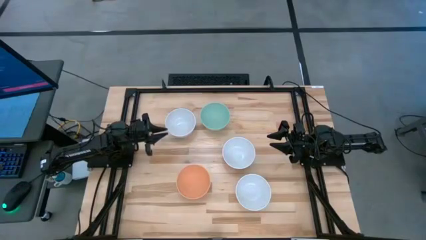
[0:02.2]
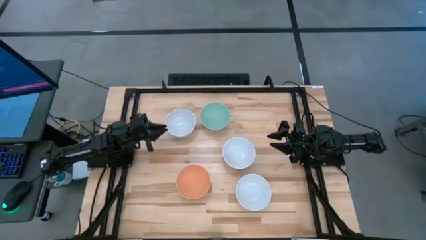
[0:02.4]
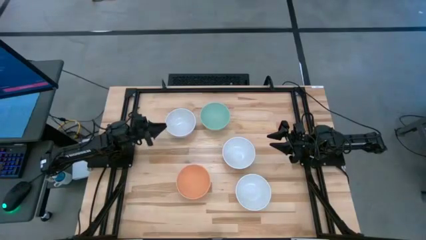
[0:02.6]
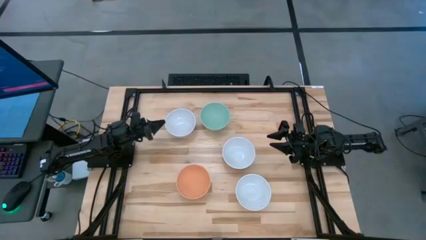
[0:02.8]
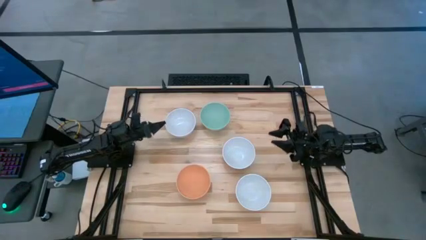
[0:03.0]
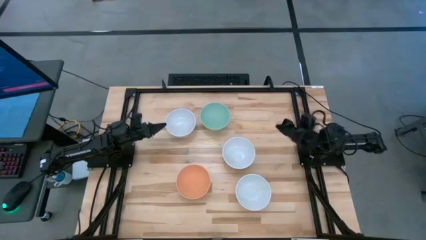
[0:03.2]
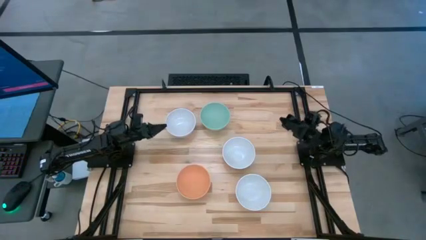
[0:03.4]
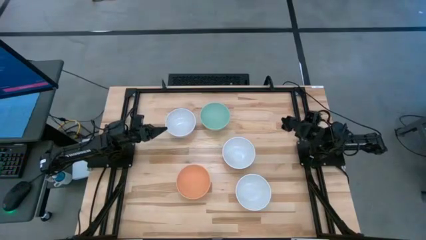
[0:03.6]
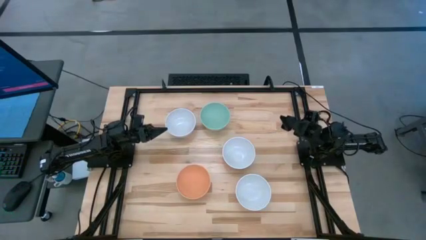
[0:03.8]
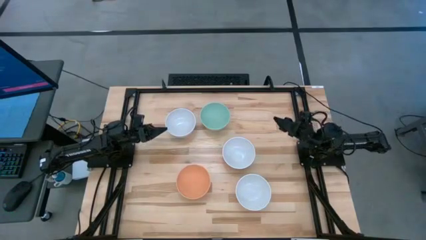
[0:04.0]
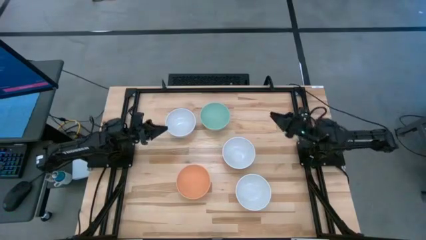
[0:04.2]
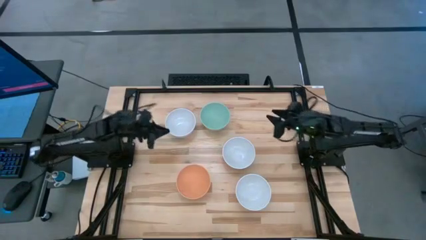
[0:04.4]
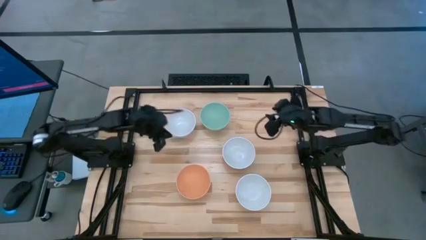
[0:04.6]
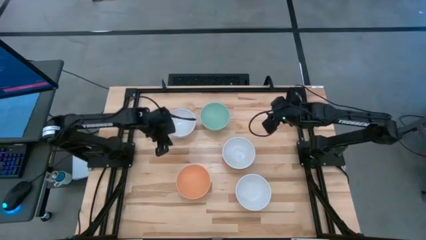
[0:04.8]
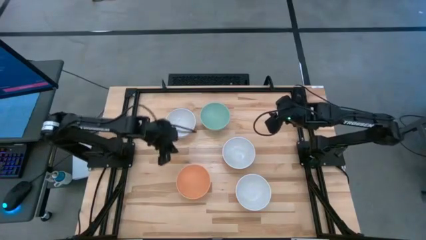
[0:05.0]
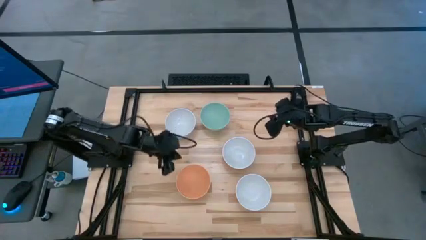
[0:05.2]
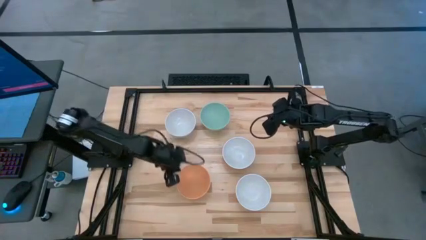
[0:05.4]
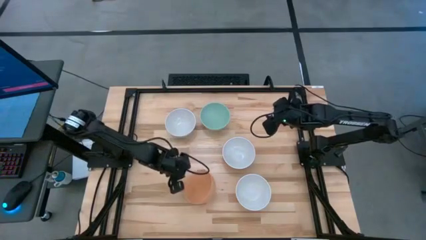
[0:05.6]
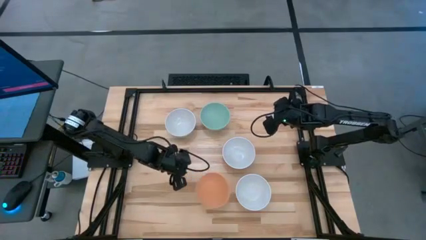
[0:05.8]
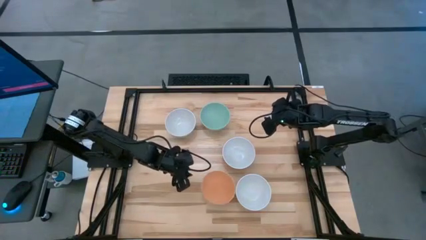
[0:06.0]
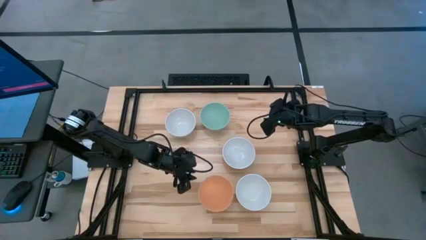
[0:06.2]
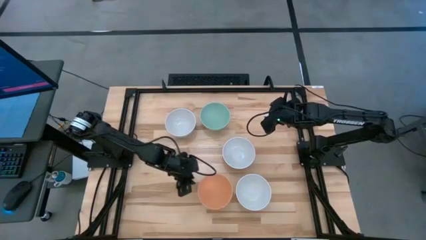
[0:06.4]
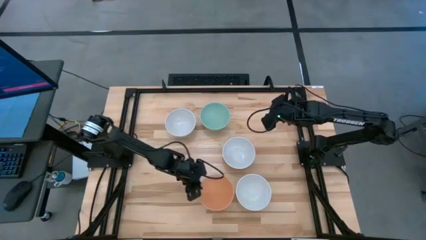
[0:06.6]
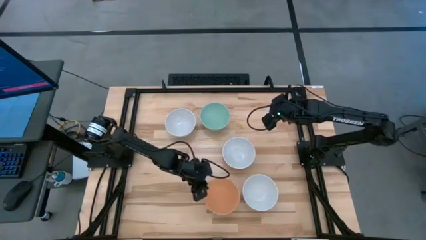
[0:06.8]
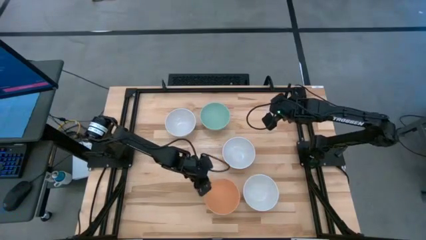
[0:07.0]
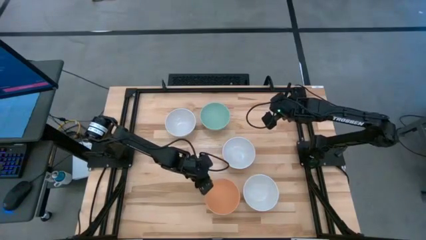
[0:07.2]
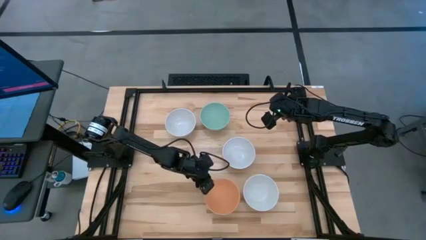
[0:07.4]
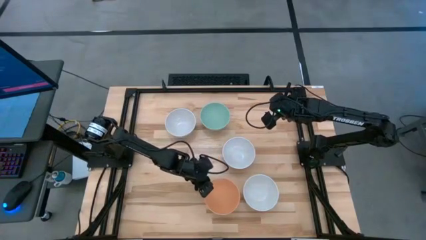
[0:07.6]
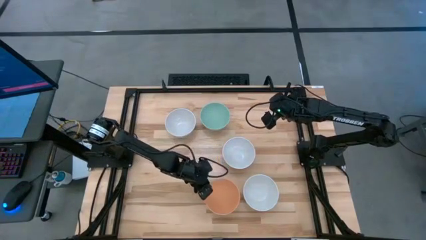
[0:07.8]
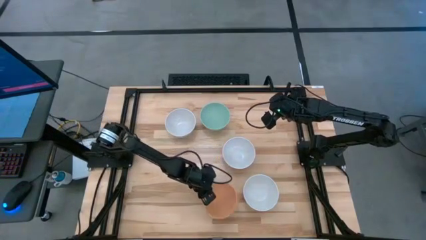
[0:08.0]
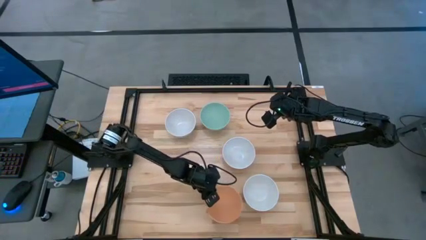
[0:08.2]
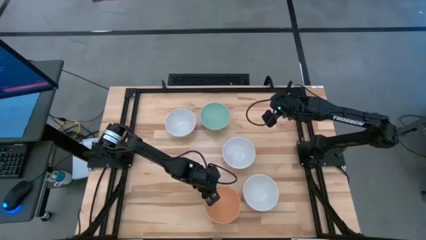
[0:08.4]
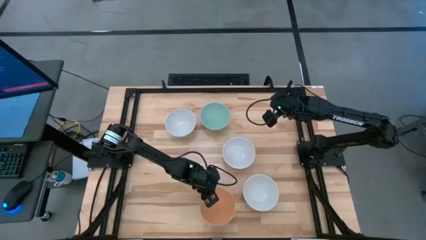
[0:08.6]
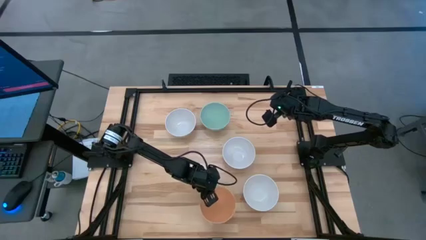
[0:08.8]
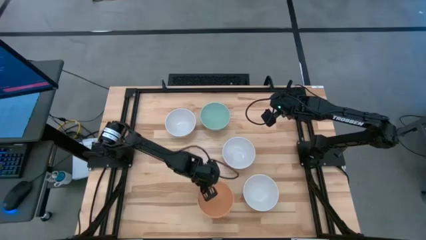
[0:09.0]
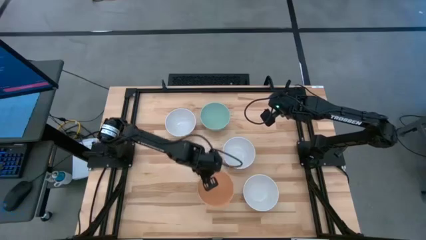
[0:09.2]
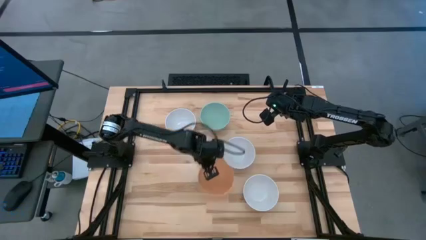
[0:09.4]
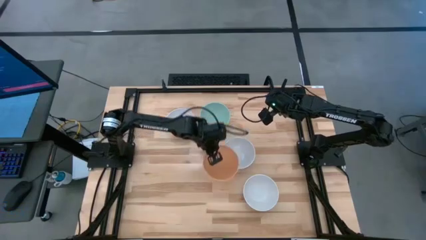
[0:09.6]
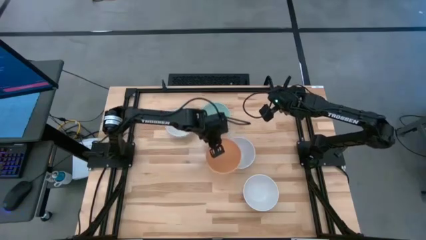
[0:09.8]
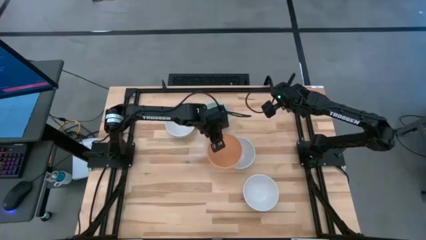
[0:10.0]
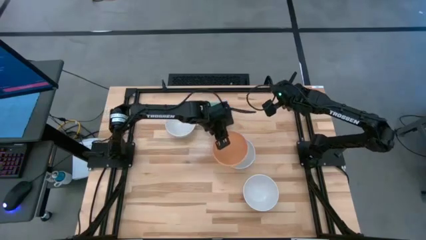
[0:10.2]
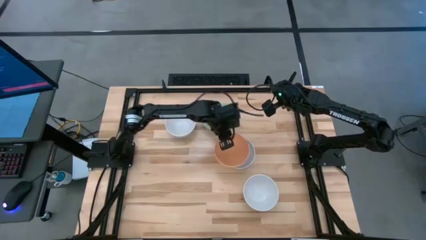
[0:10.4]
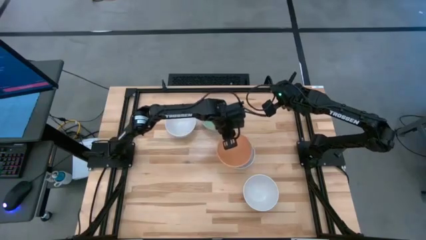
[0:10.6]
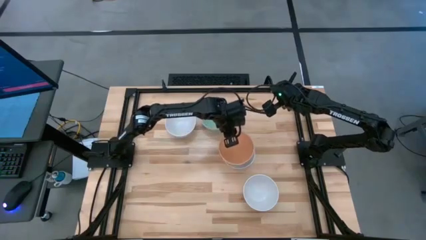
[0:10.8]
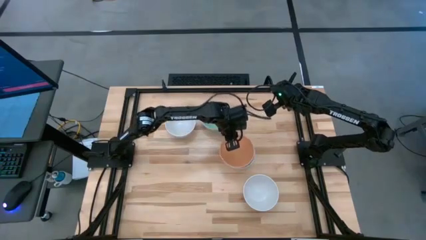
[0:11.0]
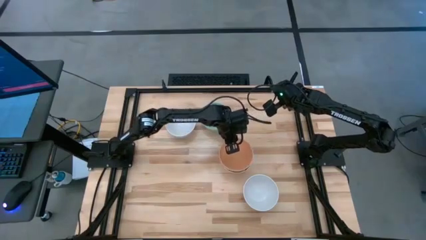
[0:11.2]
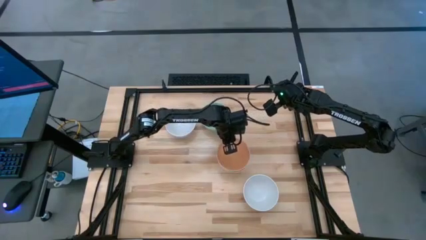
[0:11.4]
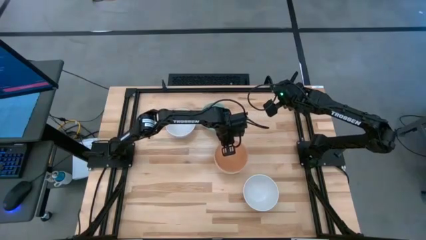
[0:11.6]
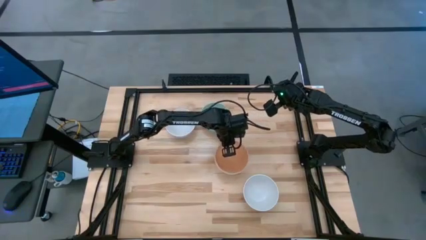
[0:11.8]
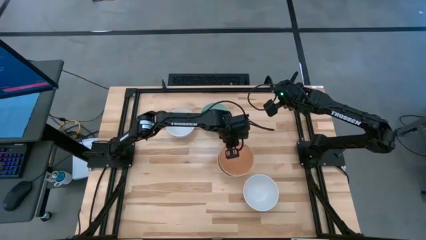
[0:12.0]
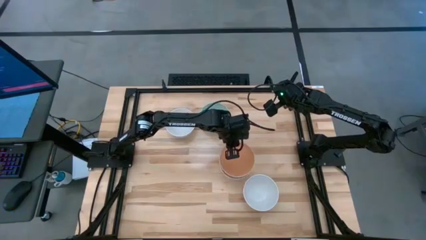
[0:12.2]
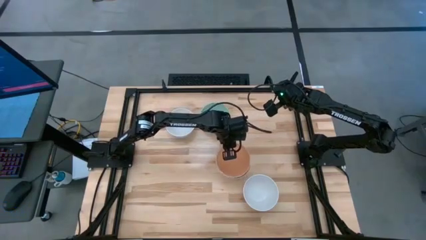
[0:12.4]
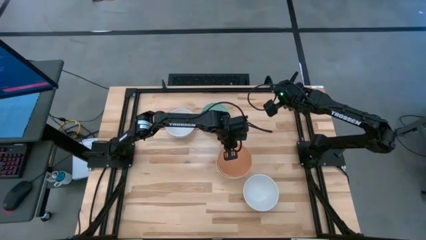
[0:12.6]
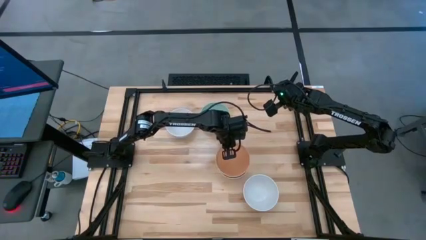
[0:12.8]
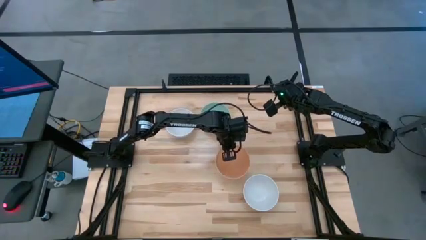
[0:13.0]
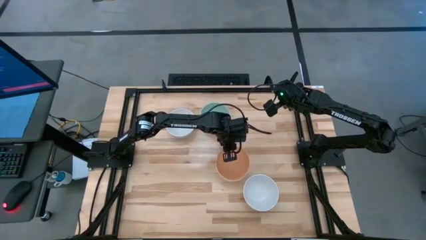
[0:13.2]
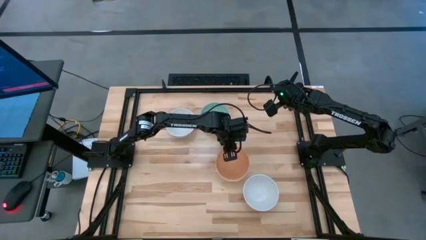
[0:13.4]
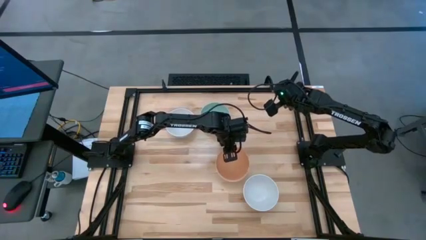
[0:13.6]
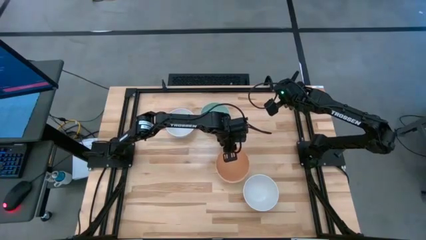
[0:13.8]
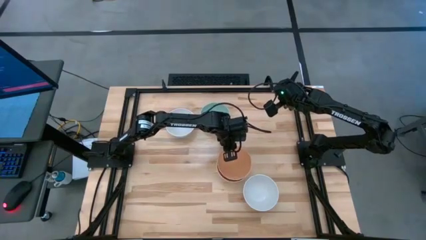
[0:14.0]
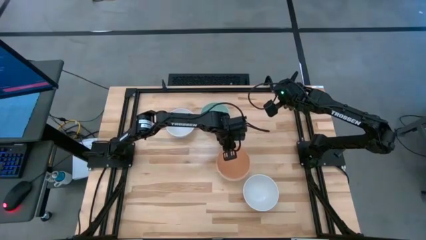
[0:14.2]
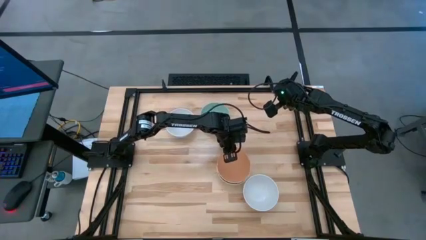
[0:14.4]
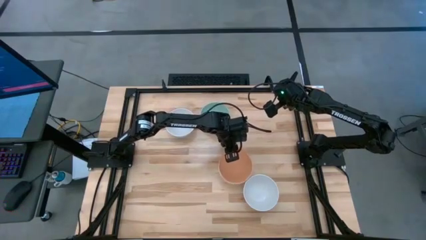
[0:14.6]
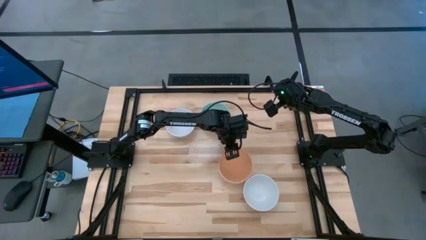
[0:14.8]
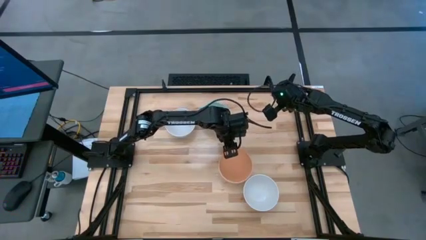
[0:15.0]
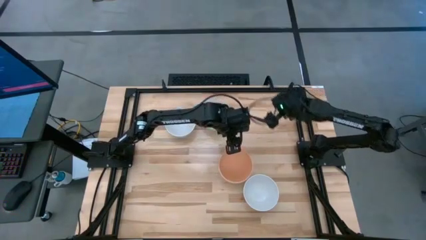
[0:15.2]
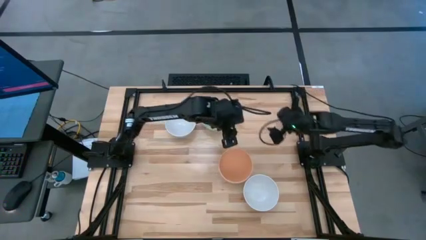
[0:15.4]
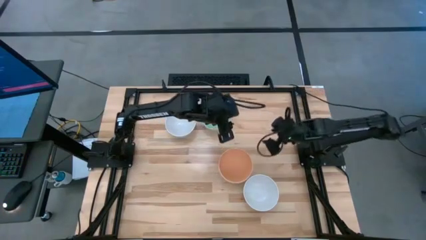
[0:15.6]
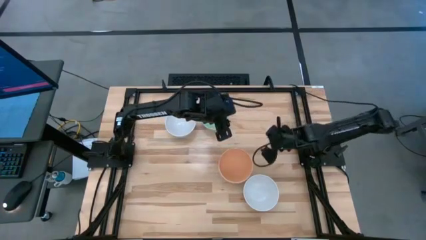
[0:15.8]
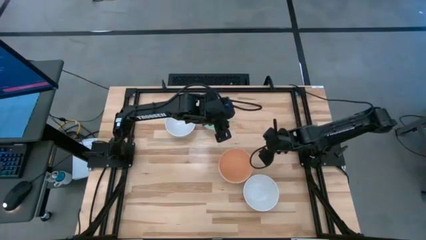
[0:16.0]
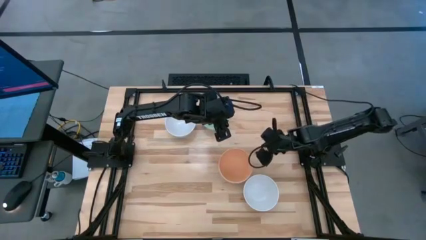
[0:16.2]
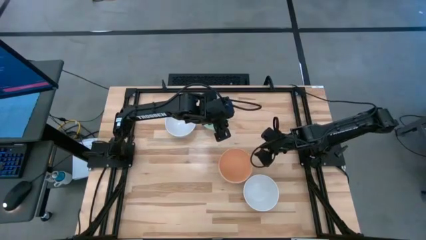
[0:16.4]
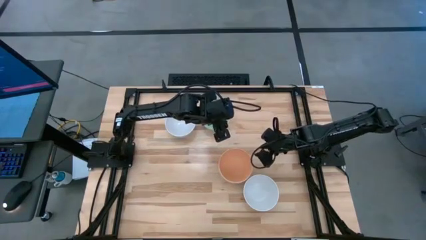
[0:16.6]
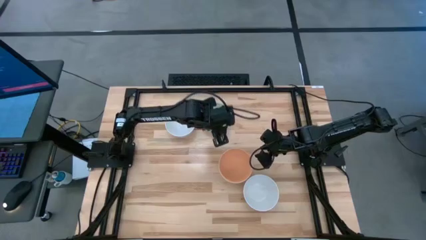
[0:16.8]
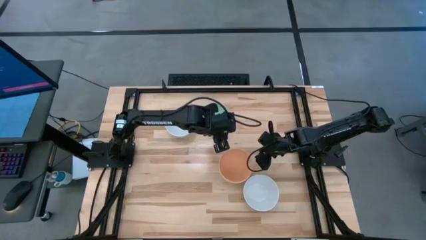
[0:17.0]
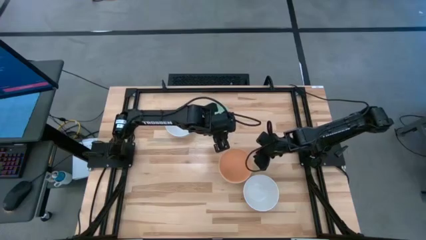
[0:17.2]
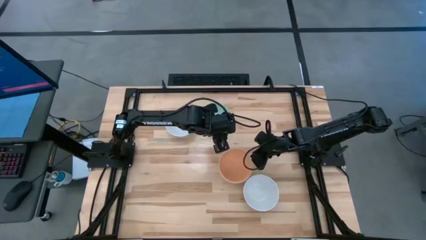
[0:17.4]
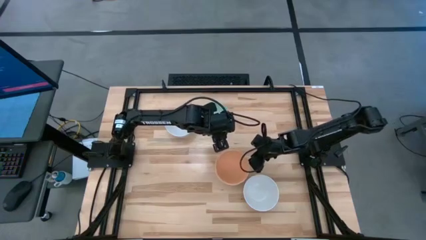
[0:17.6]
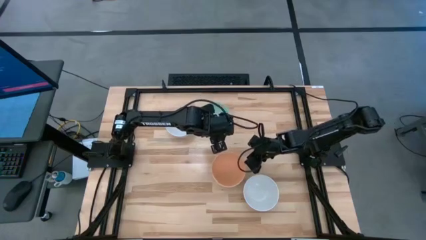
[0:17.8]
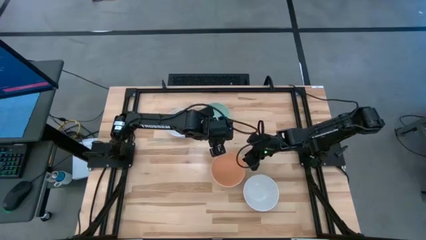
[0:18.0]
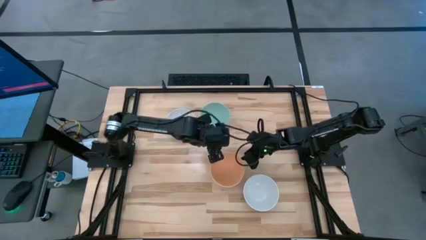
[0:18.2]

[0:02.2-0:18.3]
Task: Nest bowls inside each other
Stack the orange bowl on top of the white bowl
